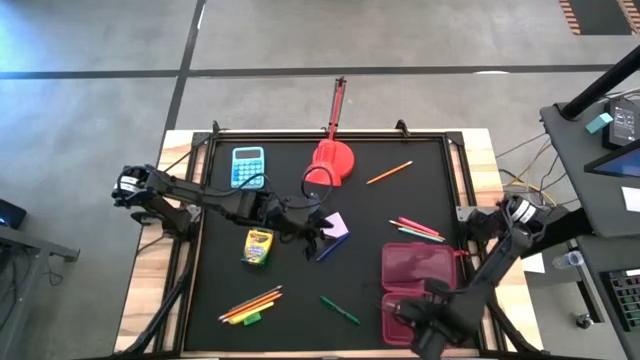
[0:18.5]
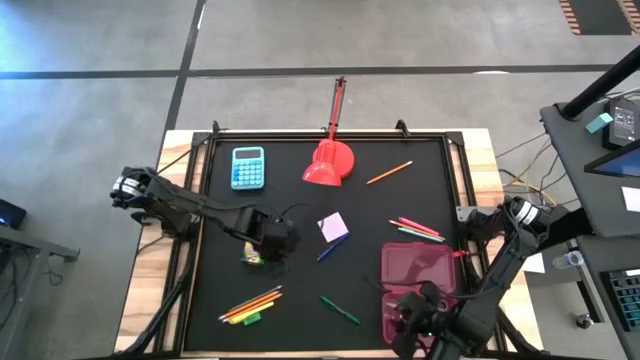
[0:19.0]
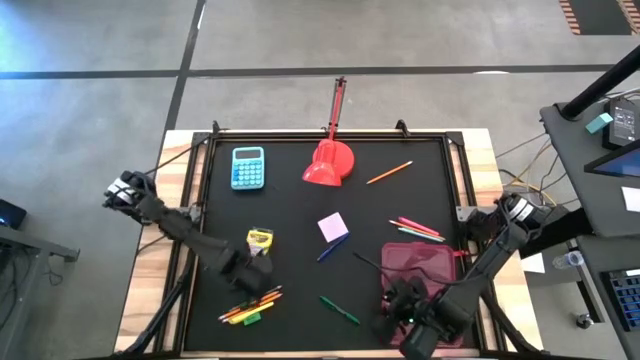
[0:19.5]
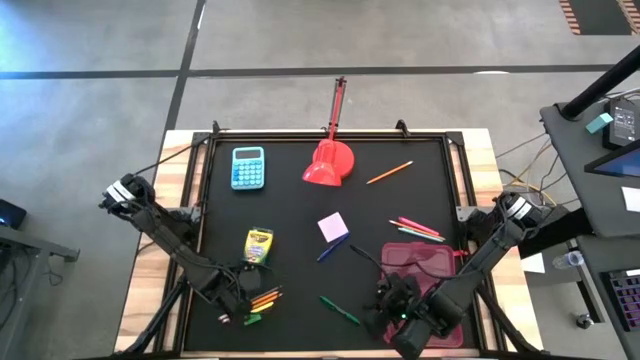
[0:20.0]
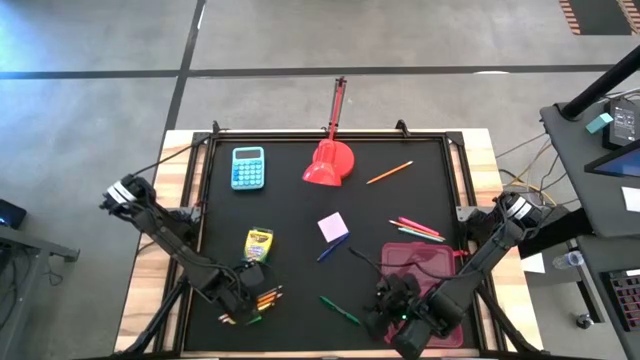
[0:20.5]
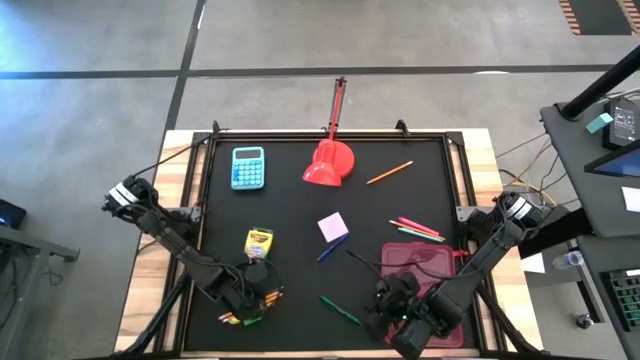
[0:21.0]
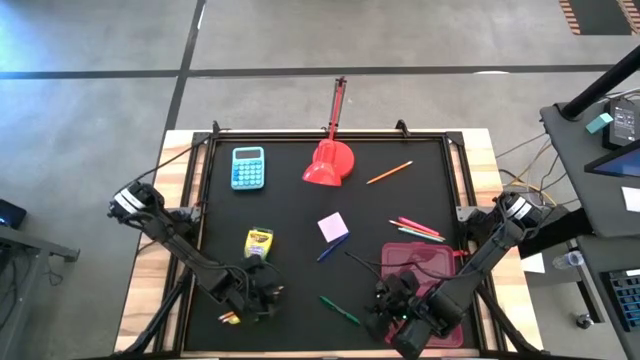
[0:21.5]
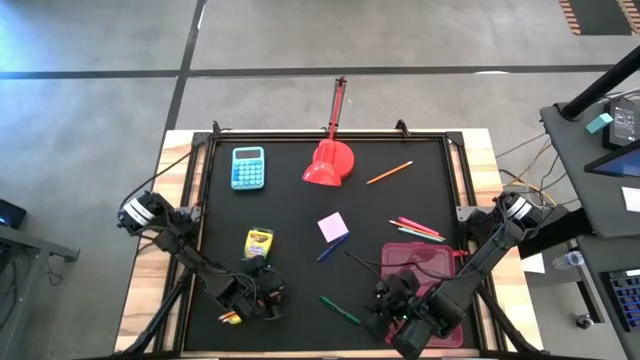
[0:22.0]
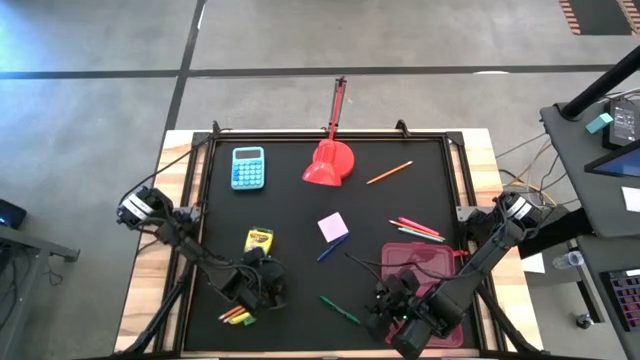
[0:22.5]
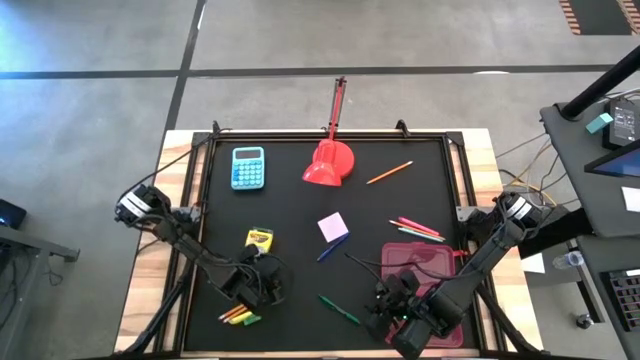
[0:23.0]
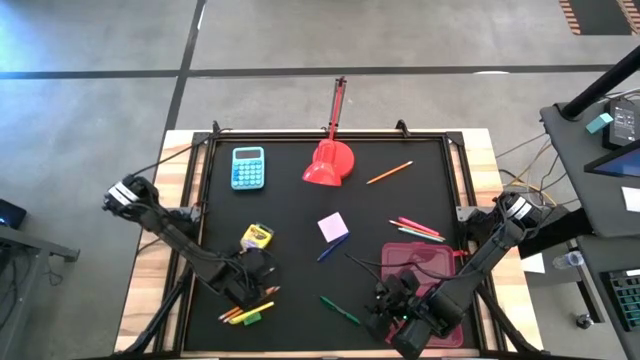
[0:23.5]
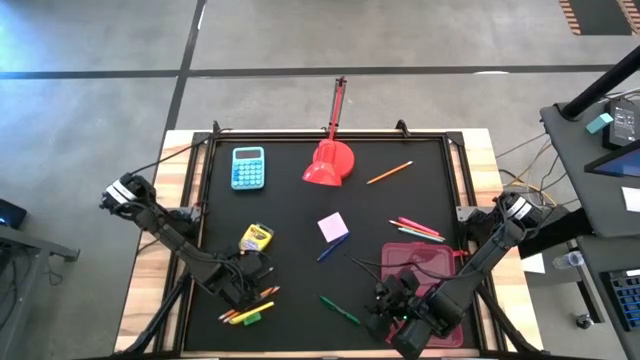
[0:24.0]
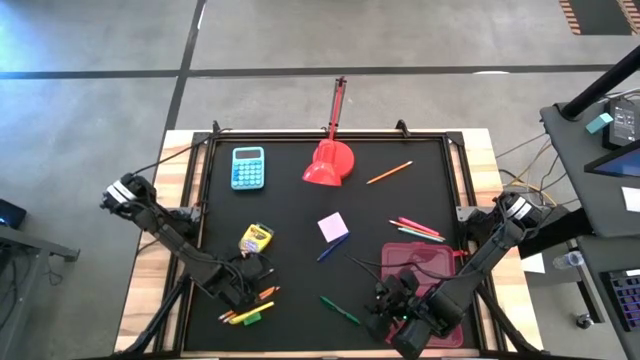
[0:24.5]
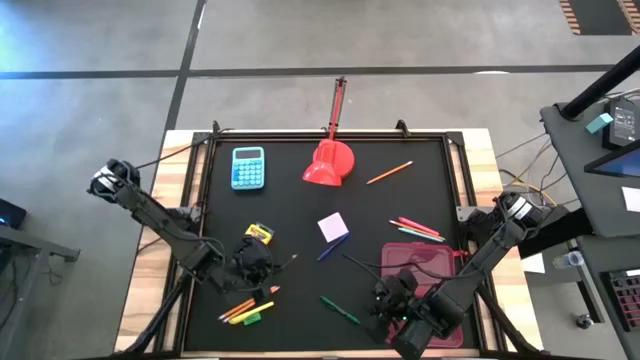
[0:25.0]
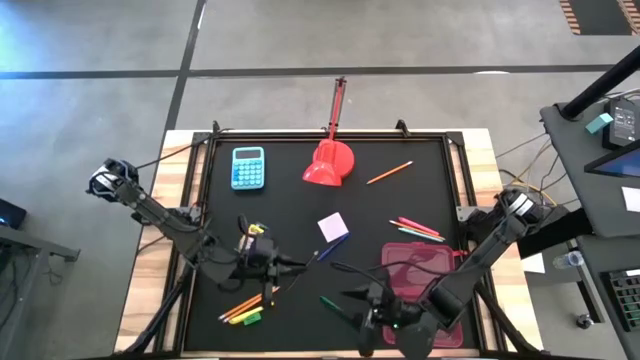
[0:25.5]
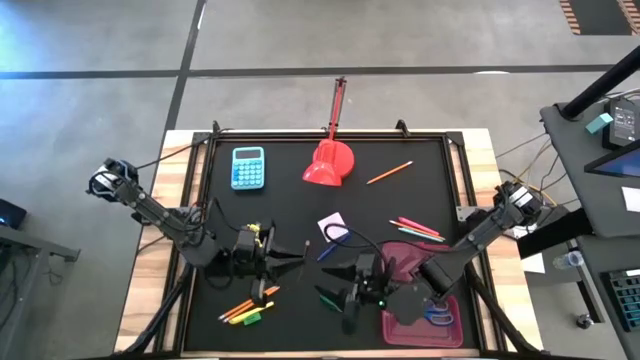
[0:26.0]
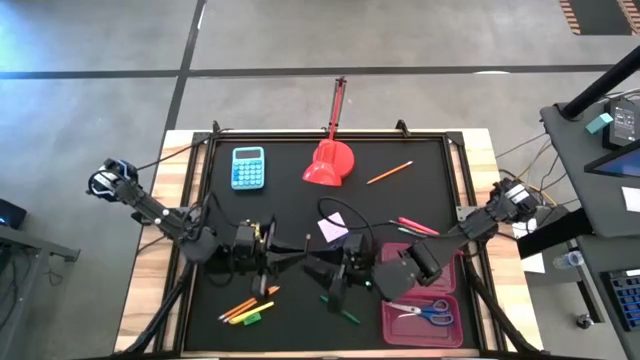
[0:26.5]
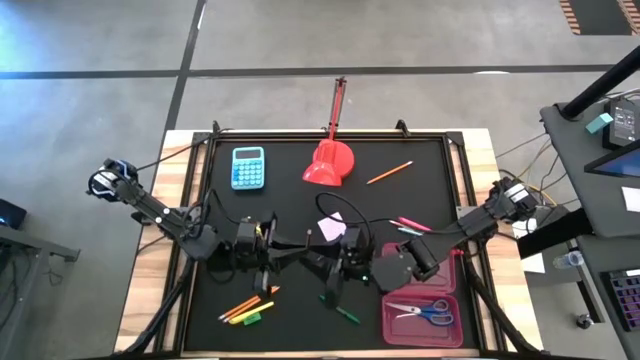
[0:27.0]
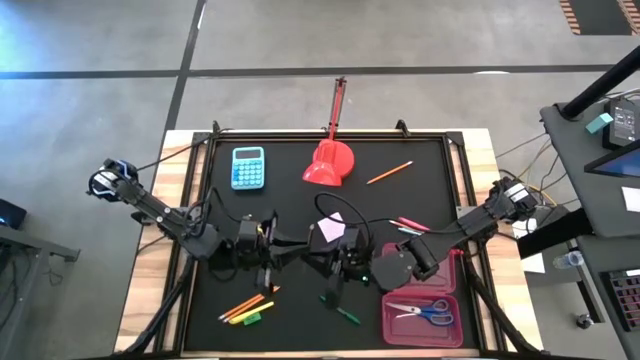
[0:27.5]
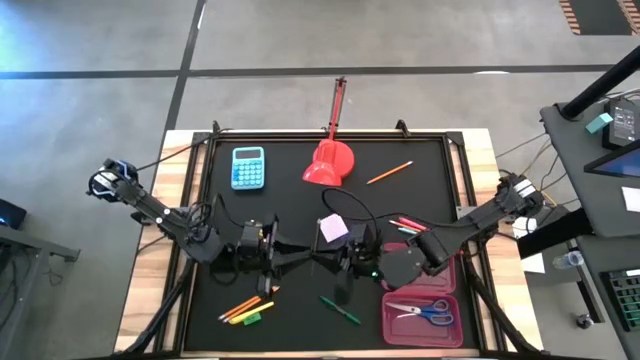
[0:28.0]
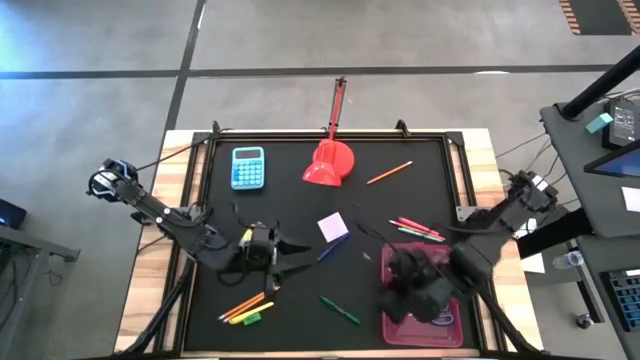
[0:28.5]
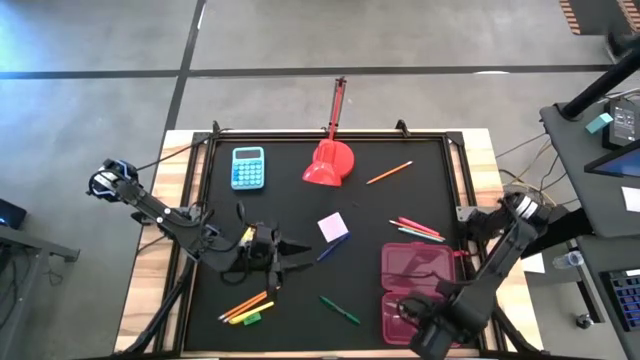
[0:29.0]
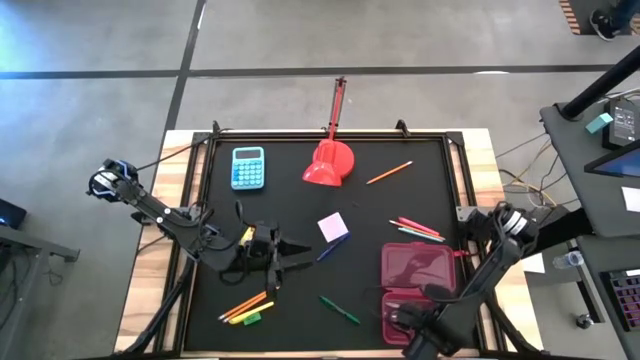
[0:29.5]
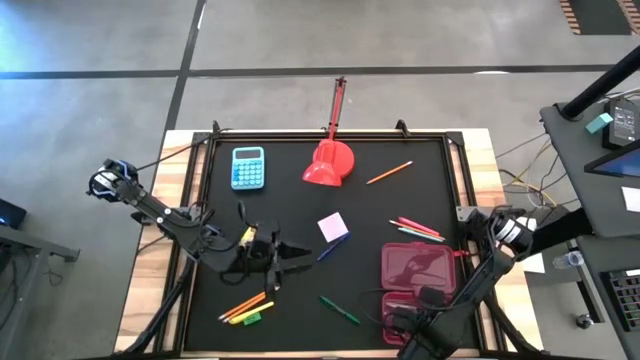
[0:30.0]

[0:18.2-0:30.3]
Task: Pack school essentials
Put the black pencil into the pink supply box

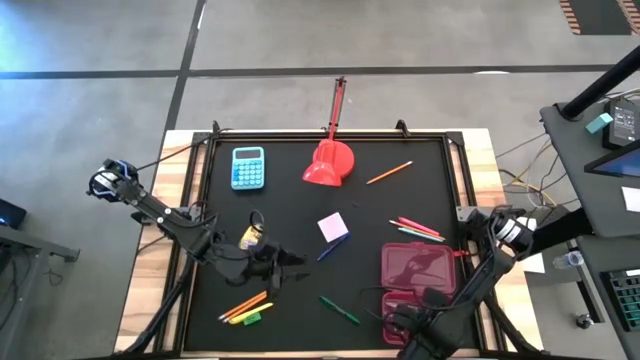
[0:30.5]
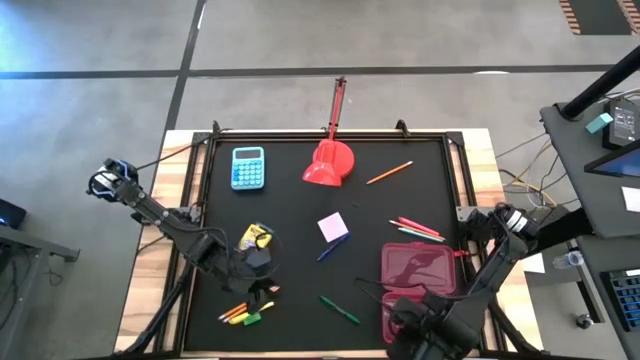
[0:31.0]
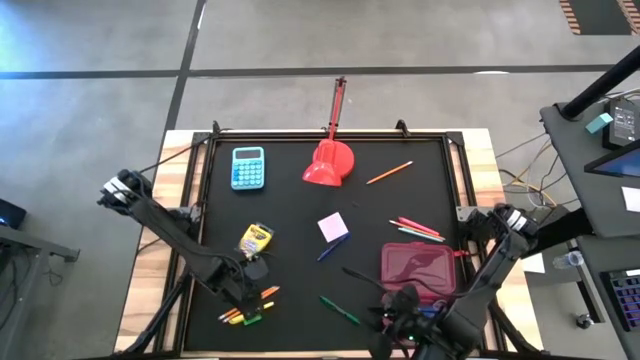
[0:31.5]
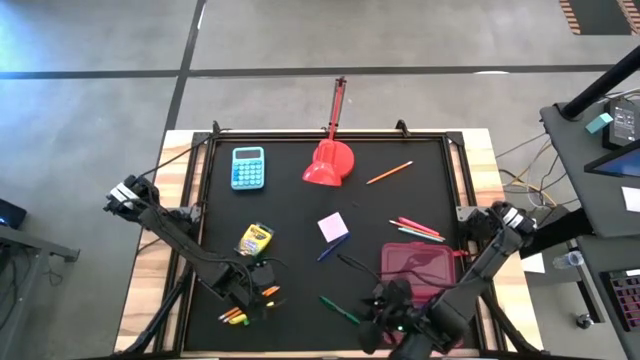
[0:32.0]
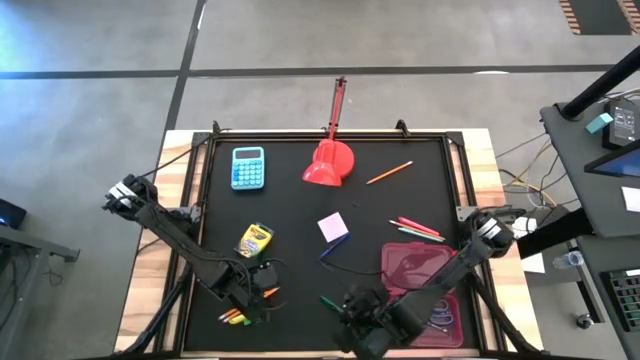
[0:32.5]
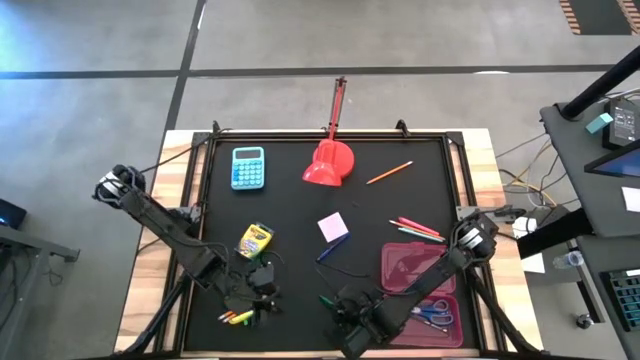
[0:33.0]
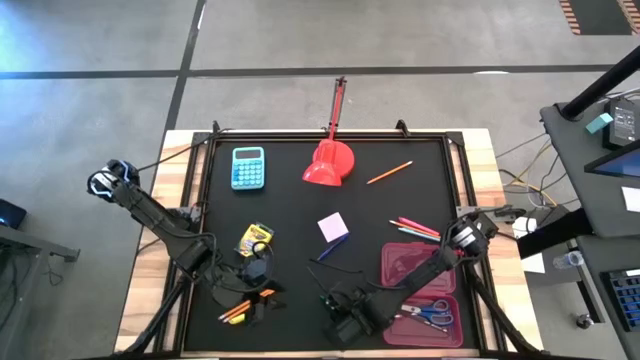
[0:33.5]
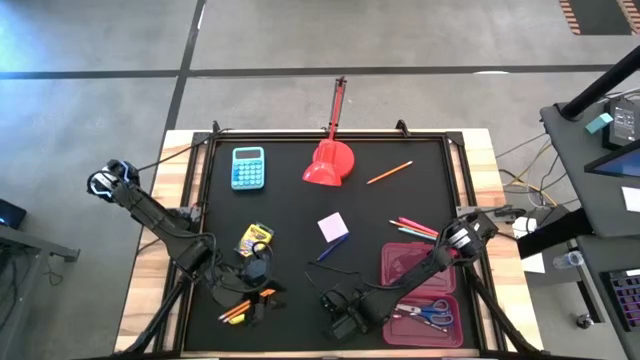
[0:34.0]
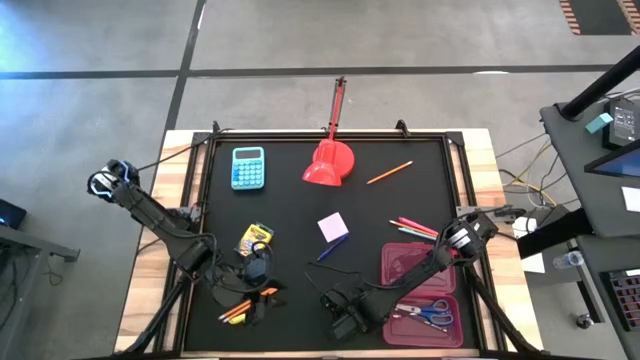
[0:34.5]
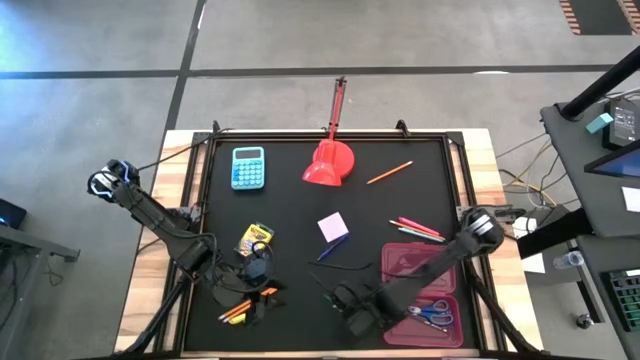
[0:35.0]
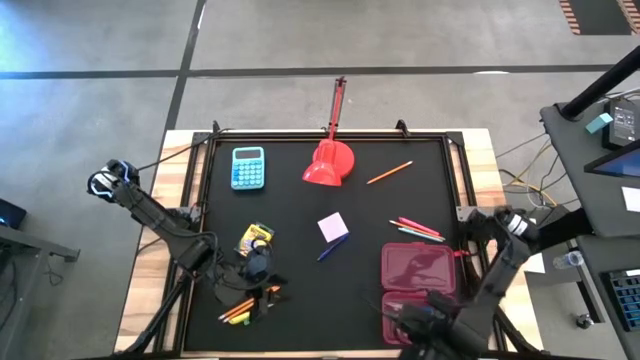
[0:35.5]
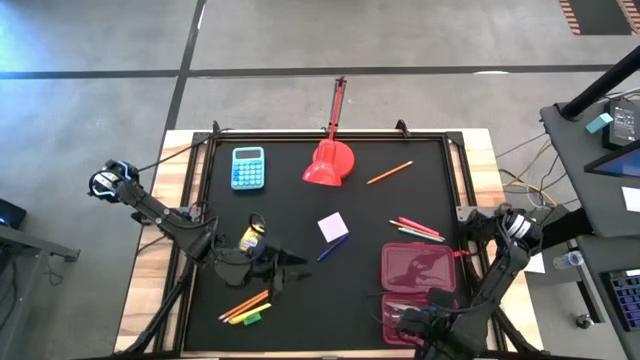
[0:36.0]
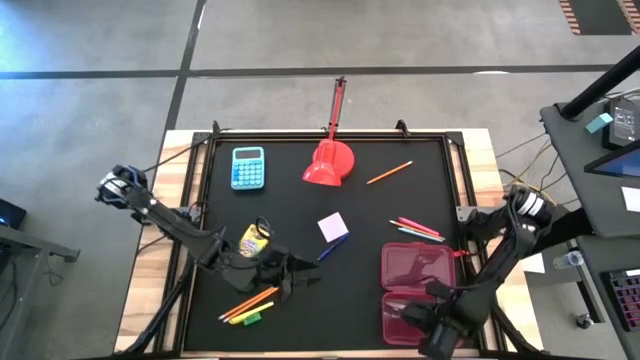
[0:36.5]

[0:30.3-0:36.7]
Put the green pen into the pink supply box

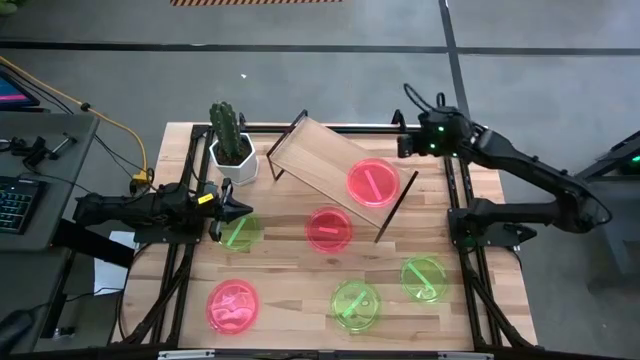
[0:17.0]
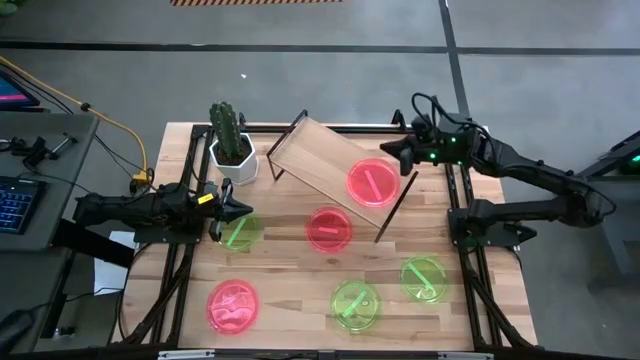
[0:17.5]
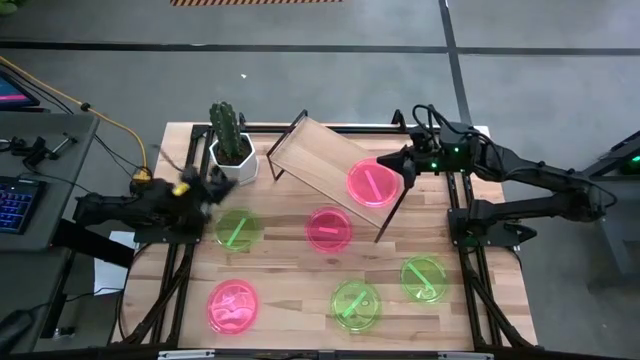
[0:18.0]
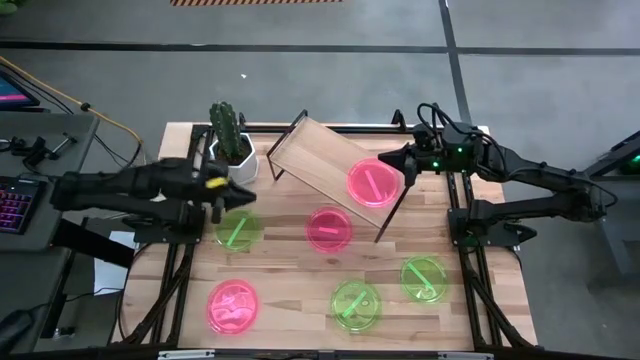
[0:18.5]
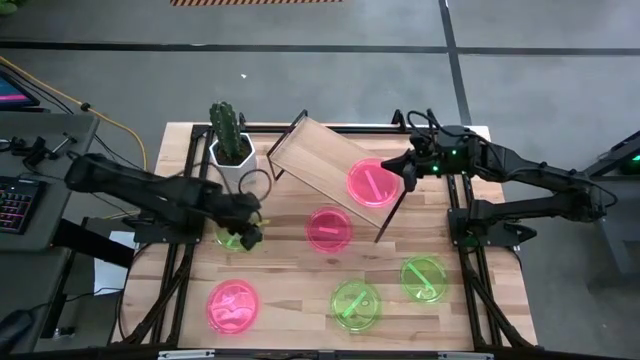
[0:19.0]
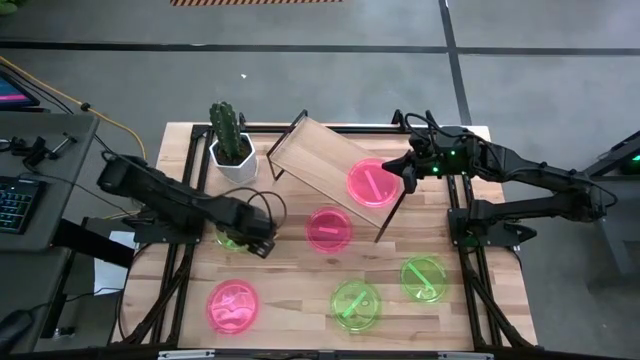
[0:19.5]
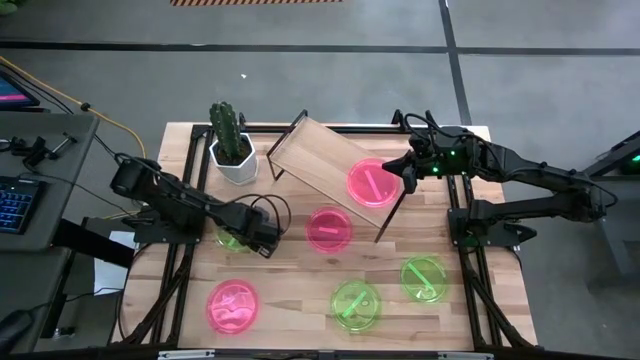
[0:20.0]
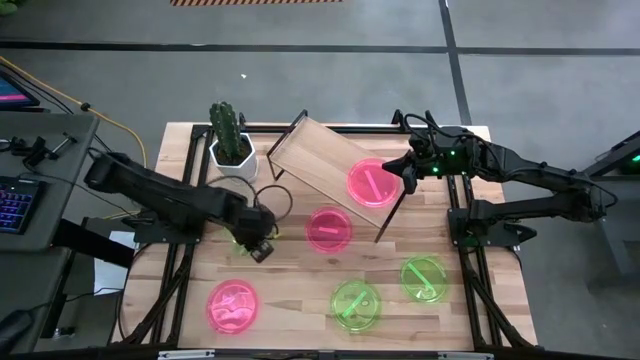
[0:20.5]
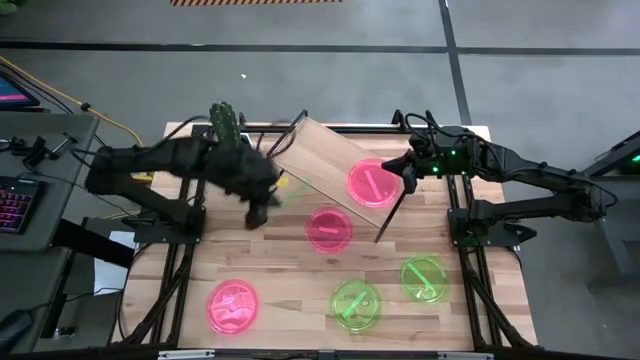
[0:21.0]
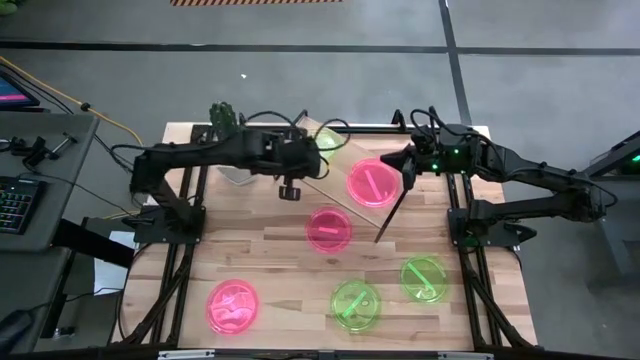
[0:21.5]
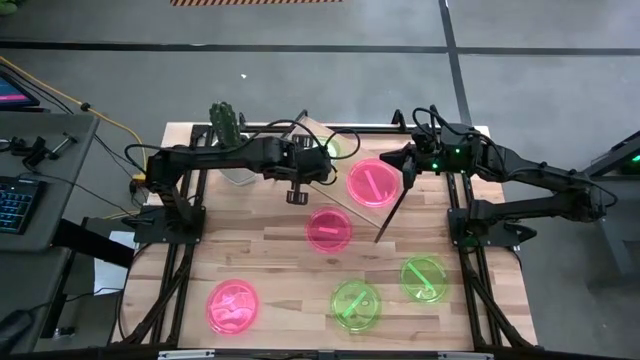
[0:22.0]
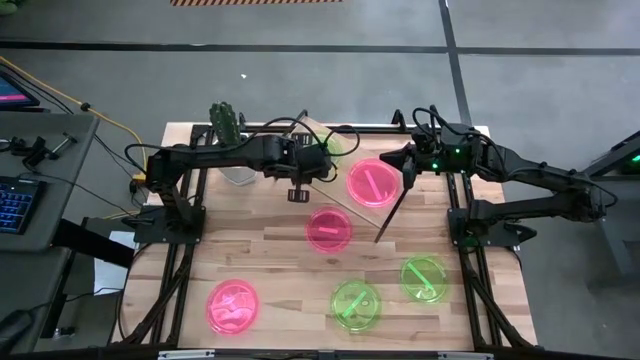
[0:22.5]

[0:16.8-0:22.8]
Task: Place and stack plates onto a shelf
Put the top left light green plate on the shelf
